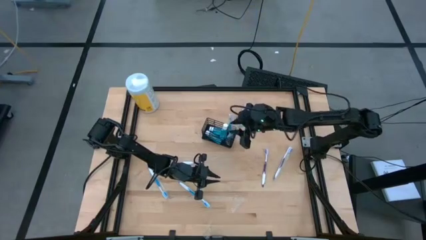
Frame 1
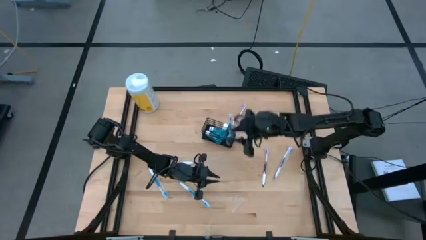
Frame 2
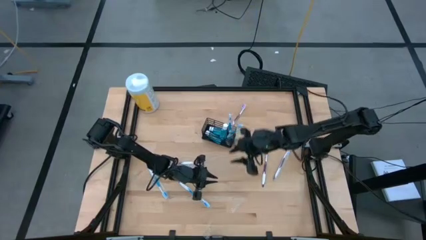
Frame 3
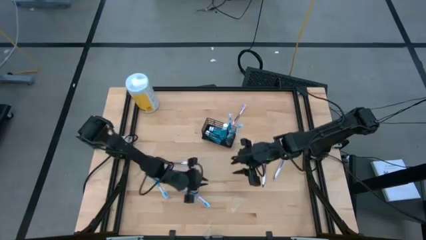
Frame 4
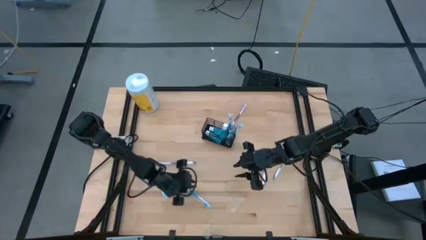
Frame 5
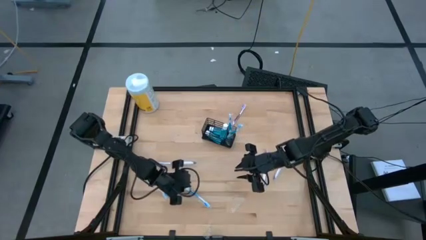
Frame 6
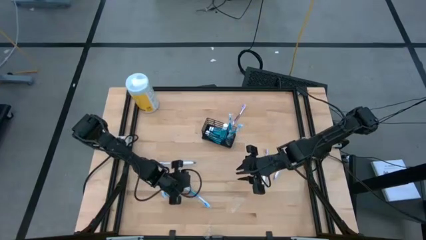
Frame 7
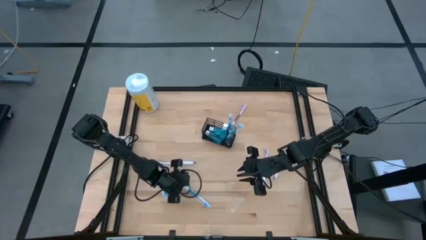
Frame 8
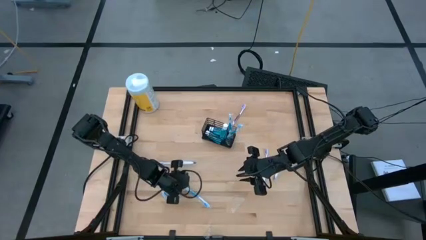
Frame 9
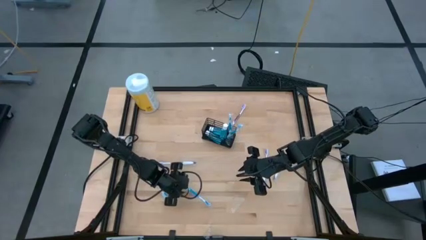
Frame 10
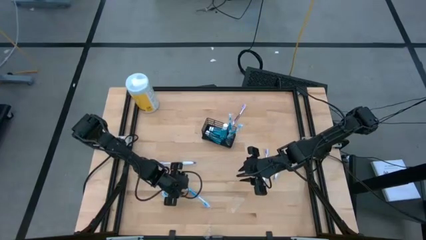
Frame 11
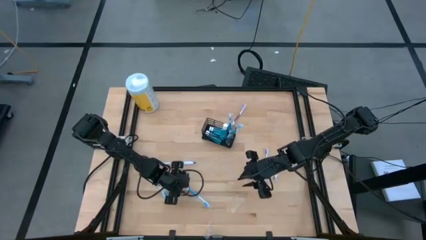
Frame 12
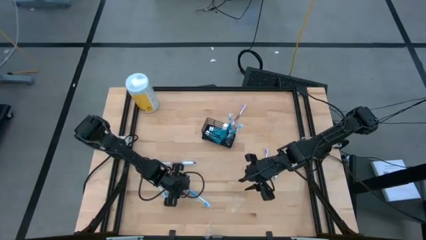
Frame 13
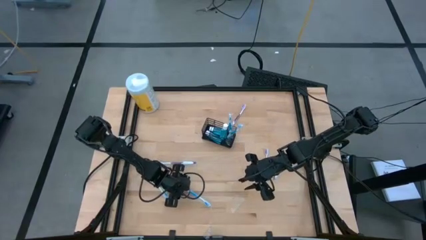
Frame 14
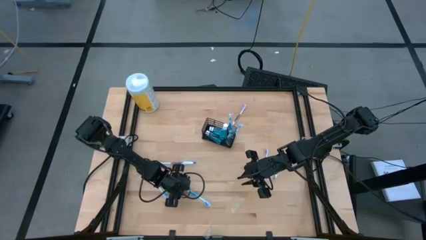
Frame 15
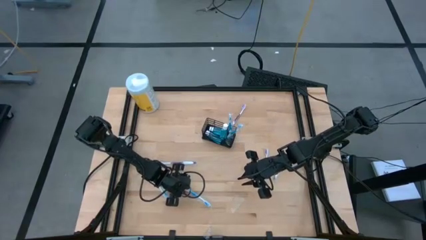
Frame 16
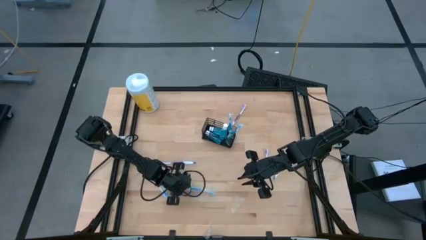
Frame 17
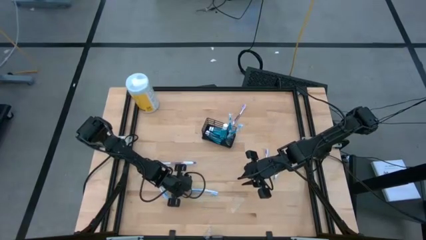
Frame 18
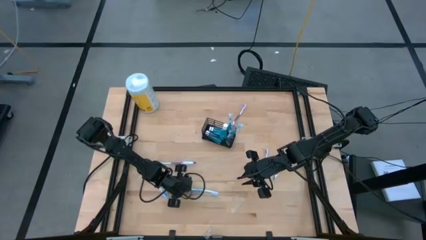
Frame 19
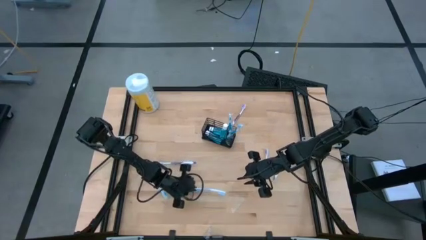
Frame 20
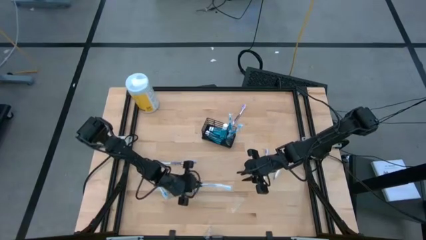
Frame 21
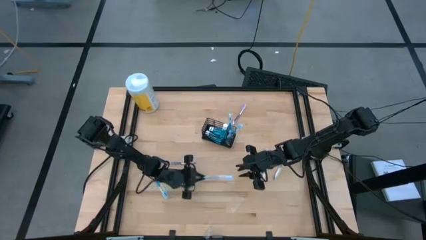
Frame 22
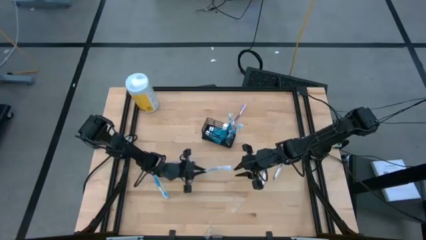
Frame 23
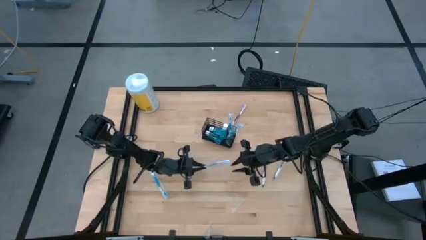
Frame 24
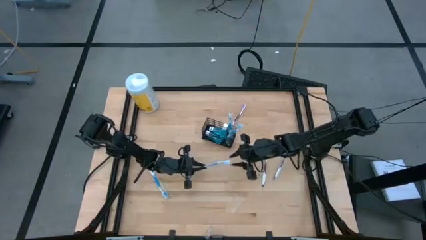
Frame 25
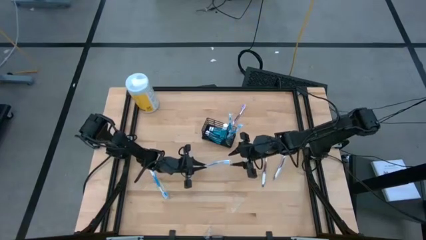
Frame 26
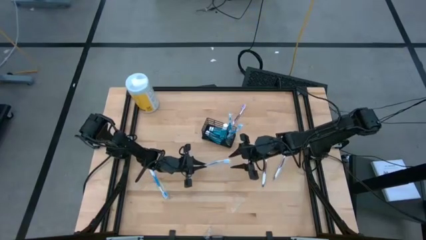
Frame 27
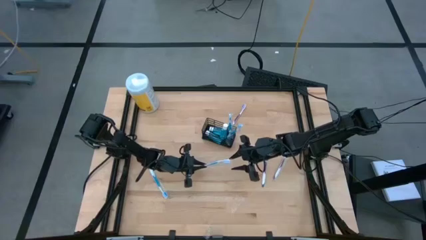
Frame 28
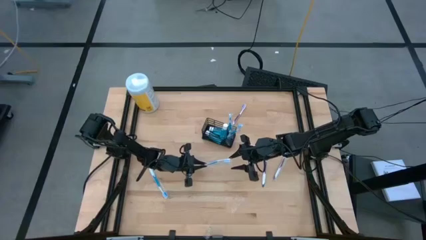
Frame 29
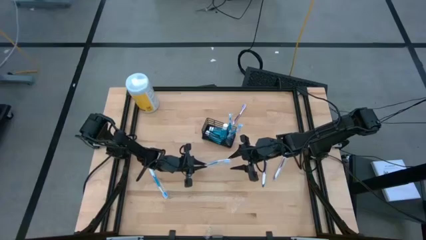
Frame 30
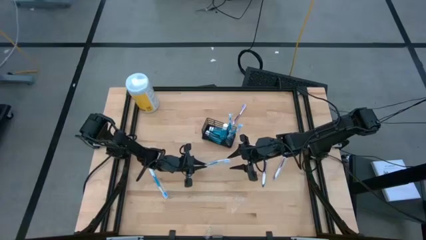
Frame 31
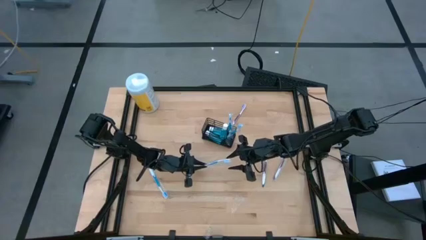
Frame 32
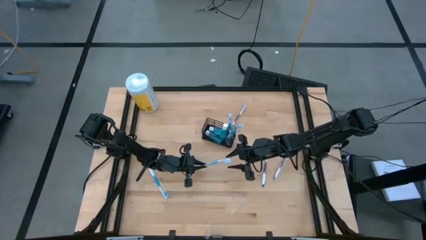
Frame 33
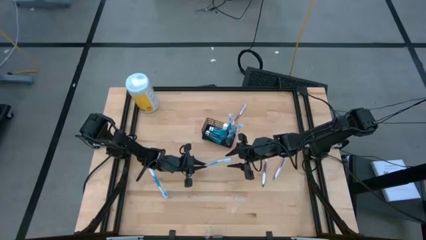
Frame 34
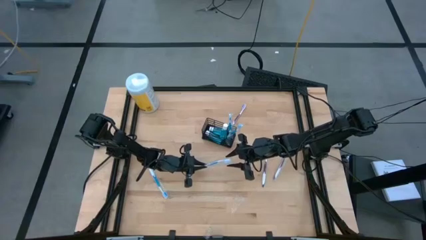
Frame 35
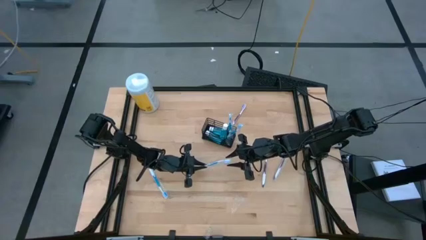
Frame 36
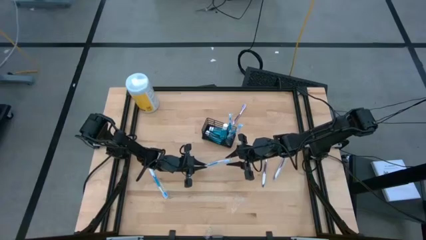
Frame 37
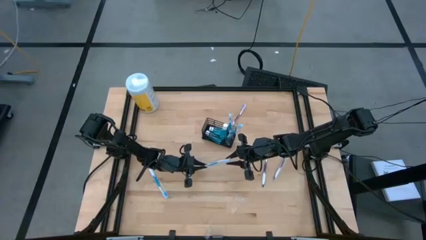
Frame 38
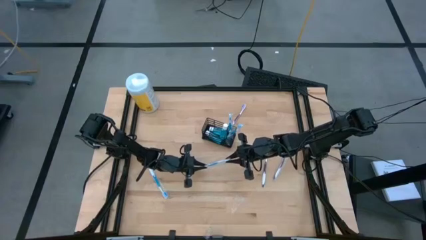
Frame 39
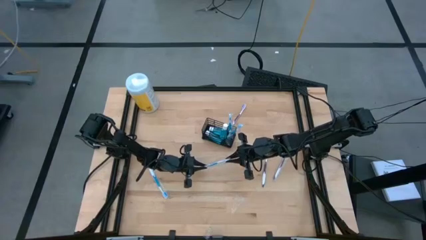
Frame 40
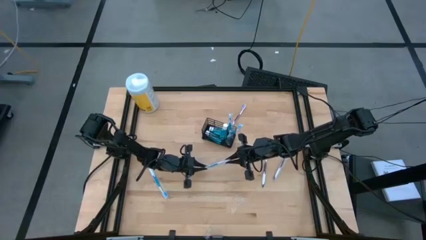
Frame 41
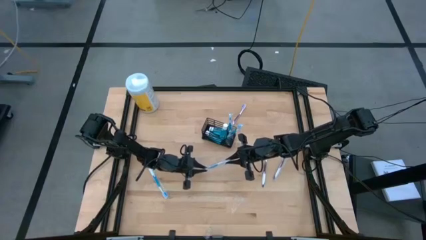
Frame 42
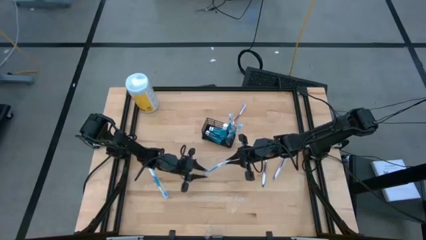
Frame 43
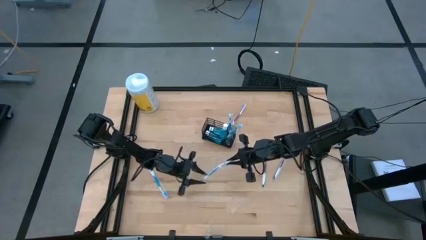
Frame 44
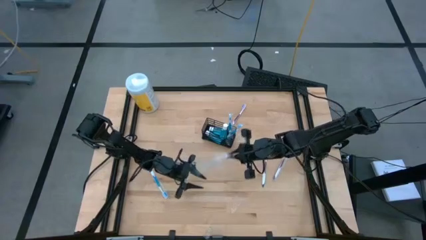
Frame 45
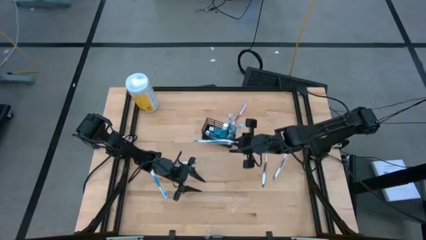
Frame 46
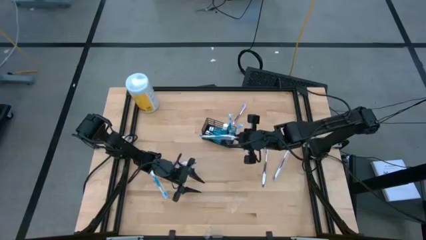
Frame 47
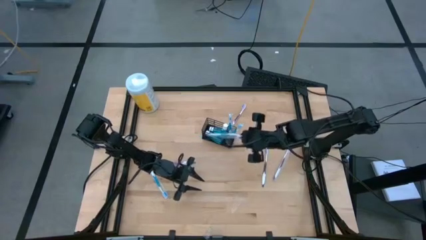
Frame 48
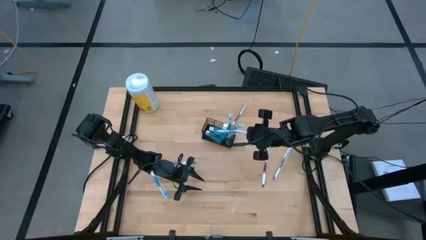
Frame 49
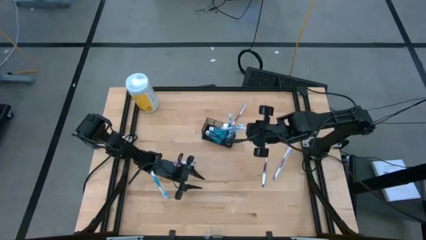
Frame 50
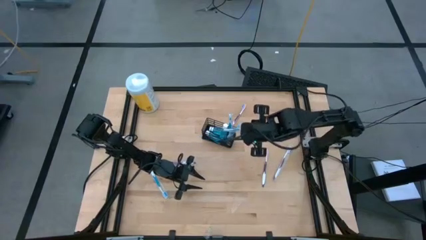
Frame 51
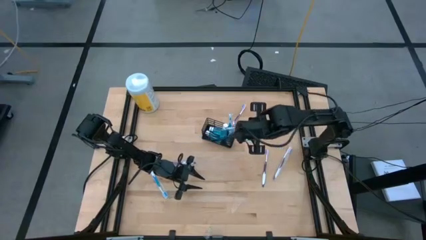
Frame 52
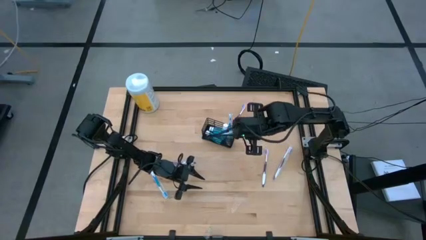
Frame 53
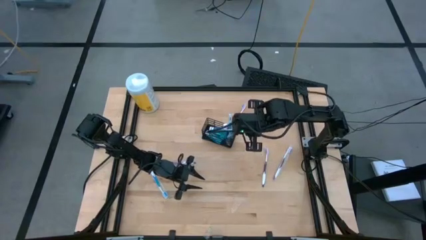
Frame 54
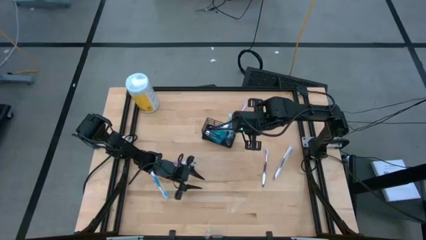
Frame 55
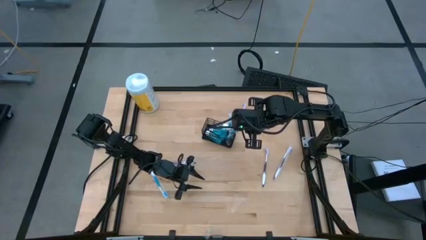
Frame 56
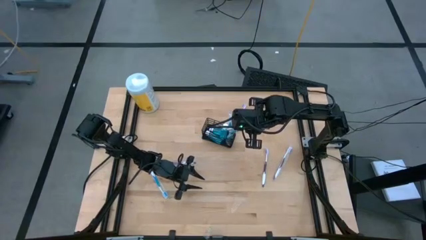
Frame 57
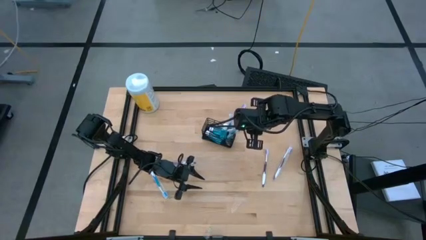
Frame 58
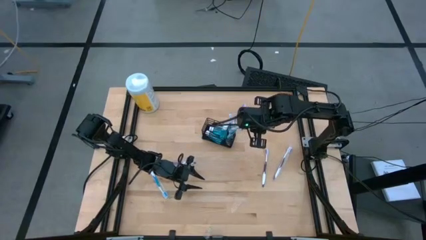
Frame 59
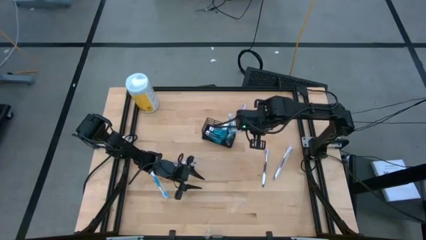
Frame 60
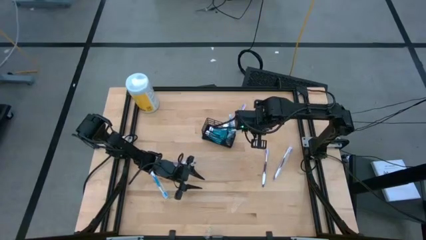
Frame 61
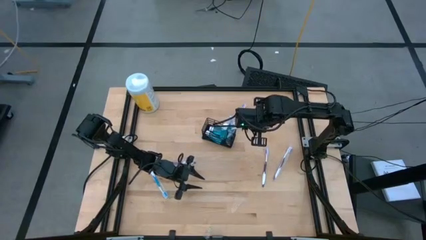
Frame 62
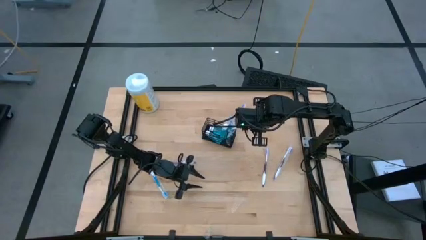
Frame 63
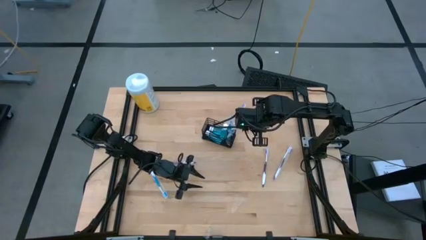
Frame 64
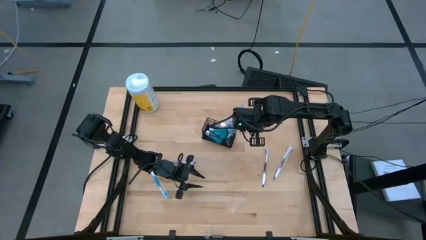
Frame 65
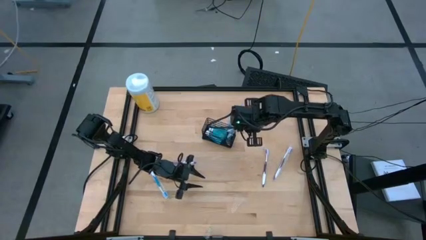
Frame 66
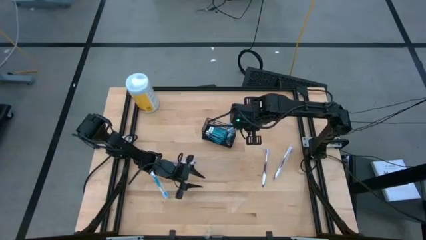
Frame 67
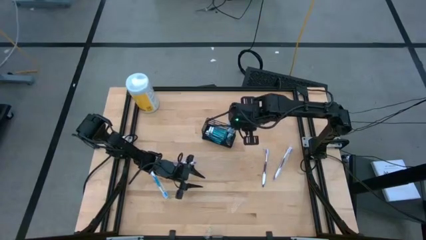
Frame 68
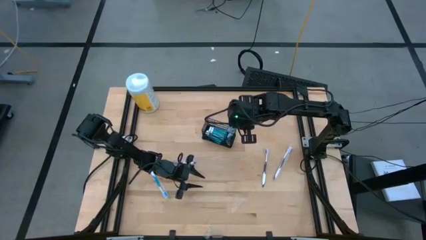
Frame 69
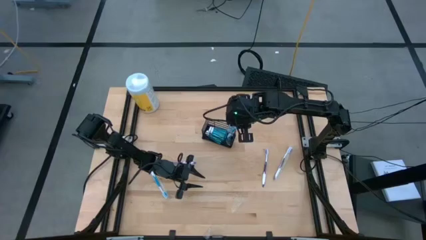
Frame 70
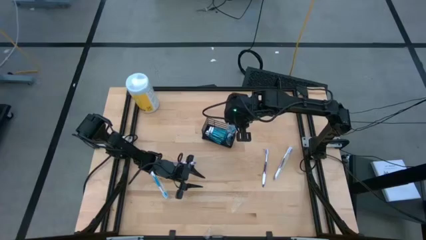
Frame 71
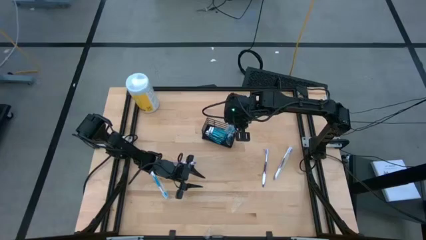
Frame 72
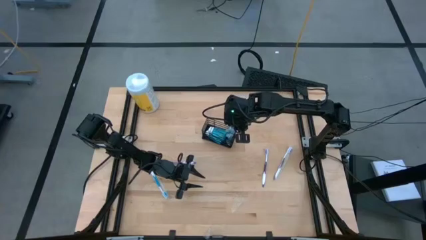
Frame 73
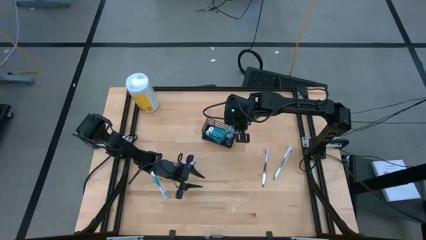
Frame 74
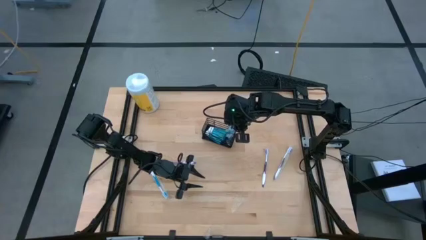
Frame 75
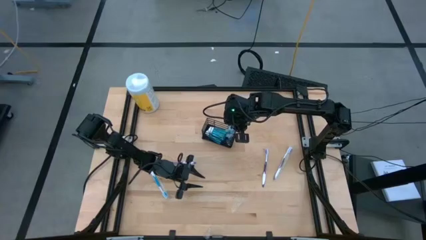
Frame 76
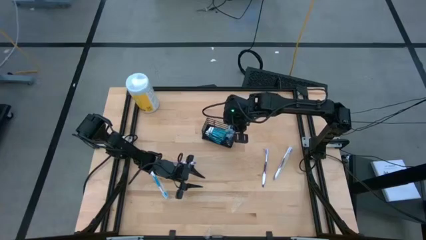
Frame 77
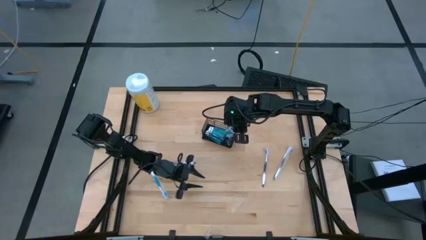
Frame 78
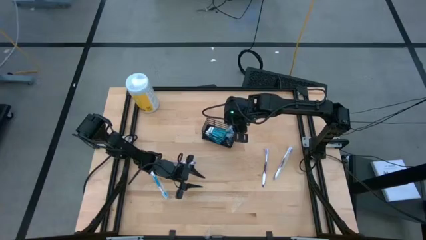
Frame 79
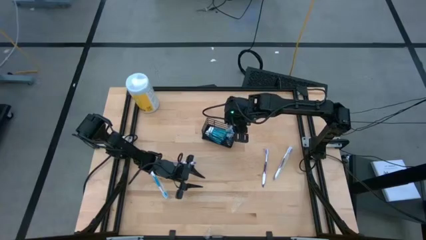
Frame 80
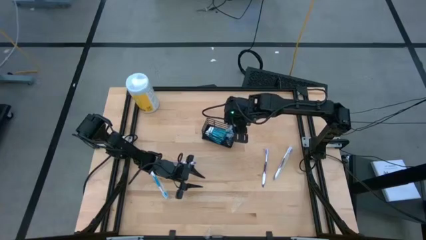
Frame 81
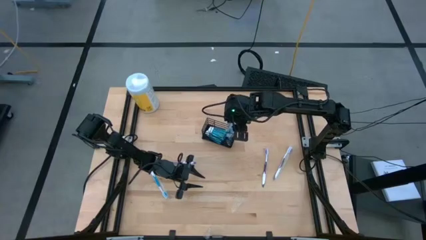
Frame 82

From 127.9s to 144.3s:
Task: Pick & Place toothbrushing station
Put the blue toothbrush into the wire organizer
